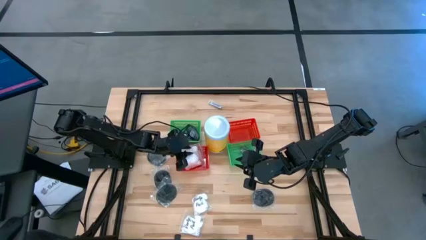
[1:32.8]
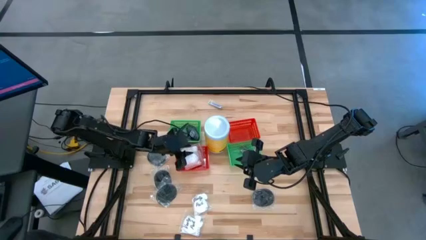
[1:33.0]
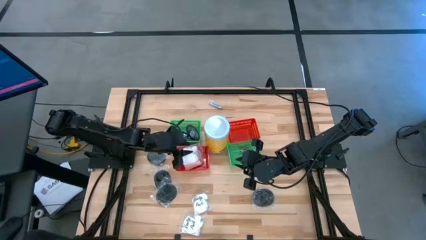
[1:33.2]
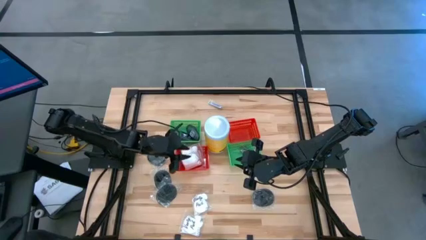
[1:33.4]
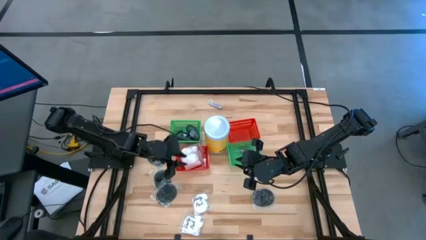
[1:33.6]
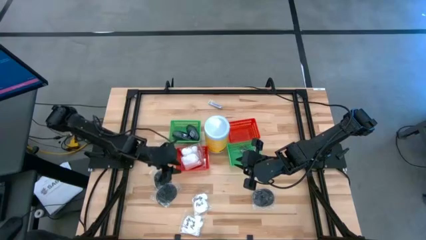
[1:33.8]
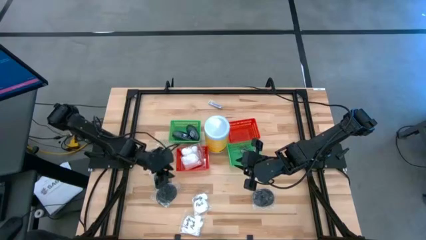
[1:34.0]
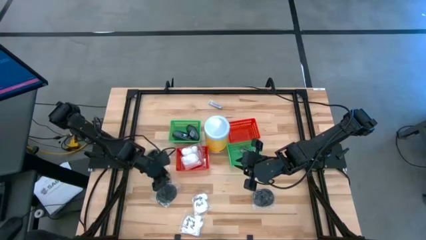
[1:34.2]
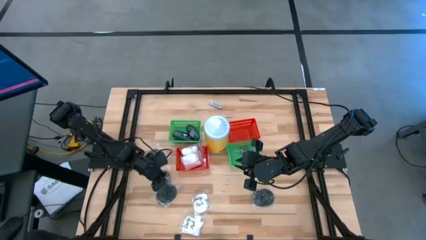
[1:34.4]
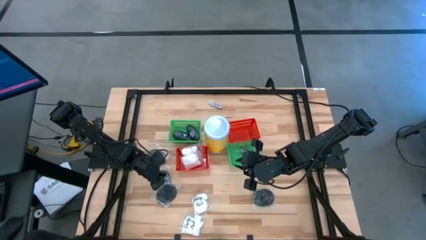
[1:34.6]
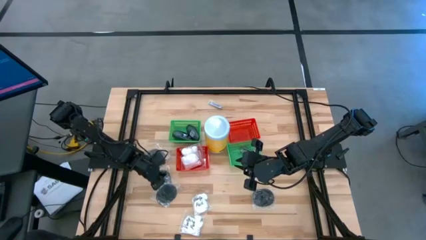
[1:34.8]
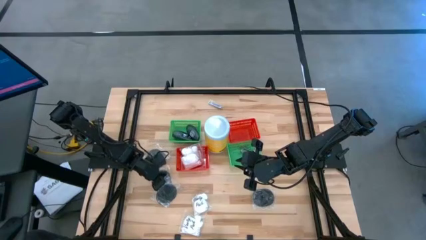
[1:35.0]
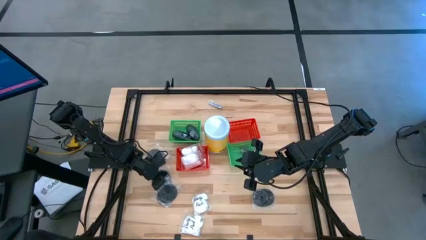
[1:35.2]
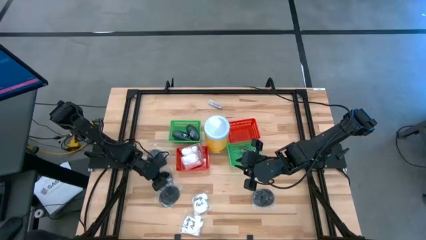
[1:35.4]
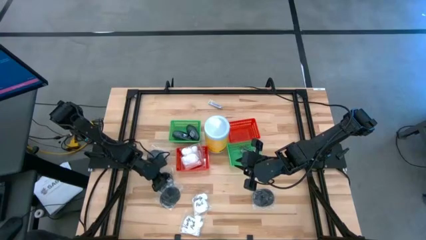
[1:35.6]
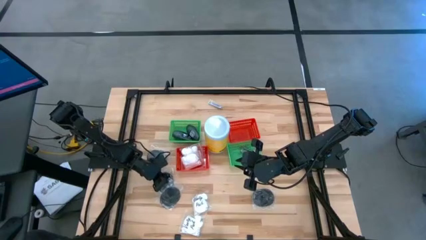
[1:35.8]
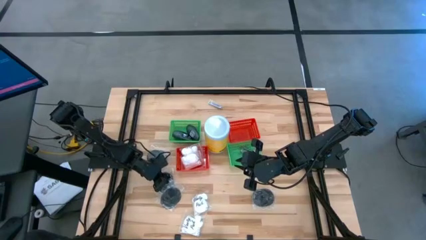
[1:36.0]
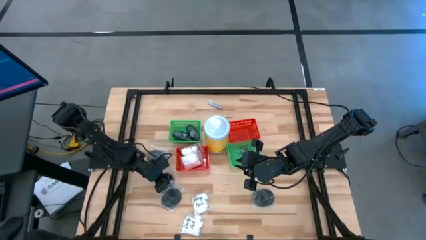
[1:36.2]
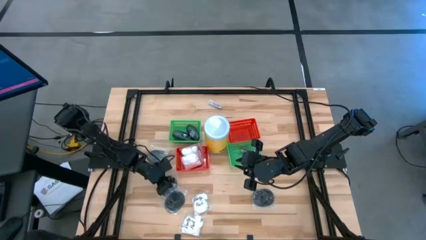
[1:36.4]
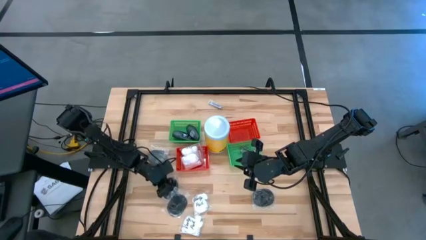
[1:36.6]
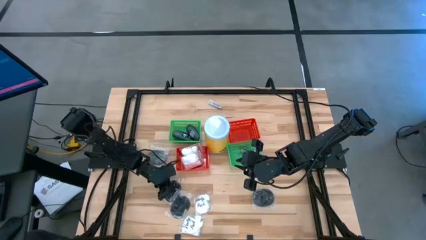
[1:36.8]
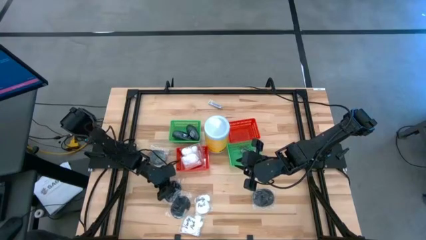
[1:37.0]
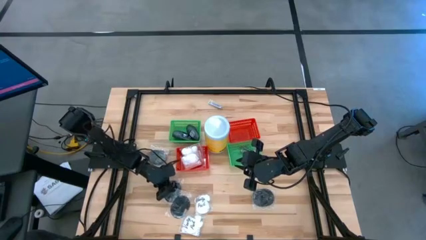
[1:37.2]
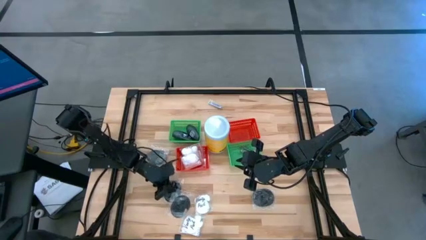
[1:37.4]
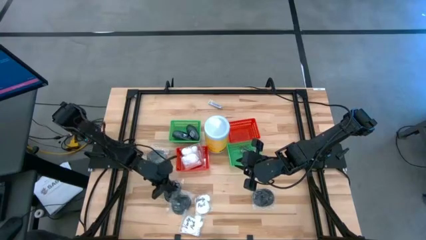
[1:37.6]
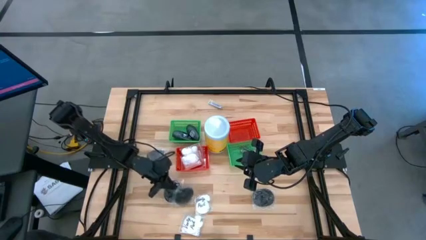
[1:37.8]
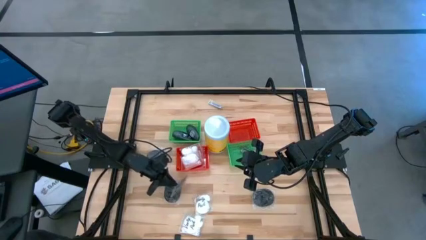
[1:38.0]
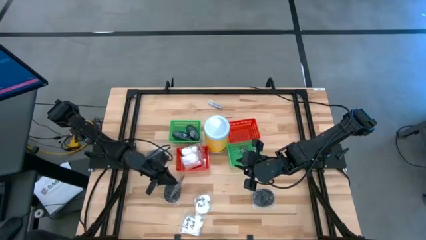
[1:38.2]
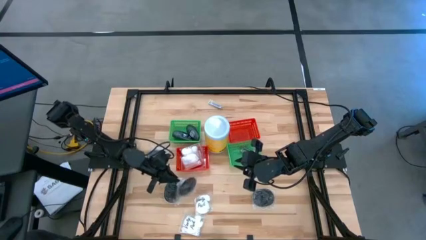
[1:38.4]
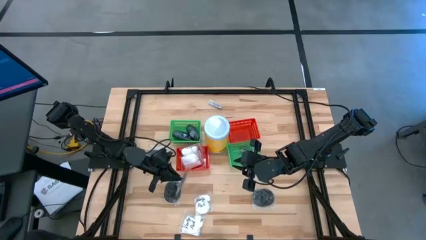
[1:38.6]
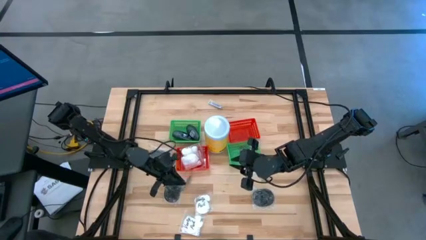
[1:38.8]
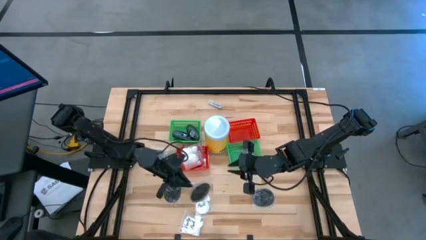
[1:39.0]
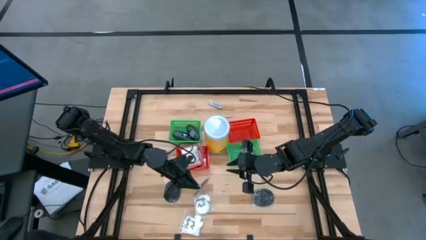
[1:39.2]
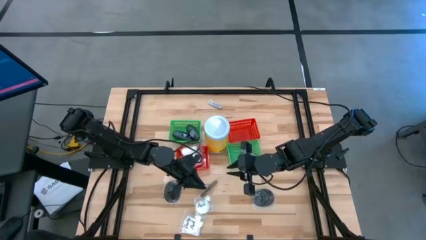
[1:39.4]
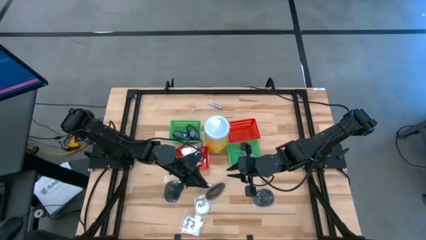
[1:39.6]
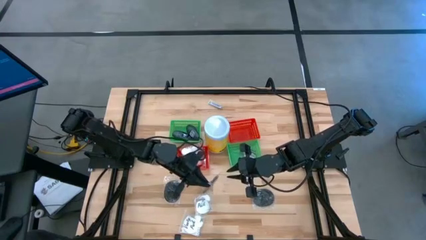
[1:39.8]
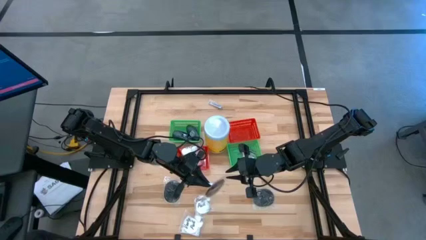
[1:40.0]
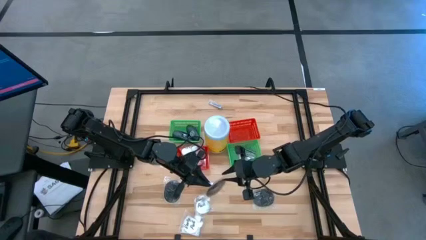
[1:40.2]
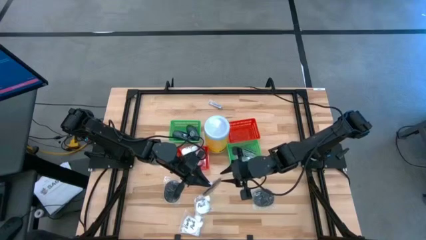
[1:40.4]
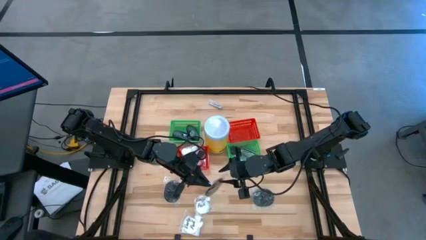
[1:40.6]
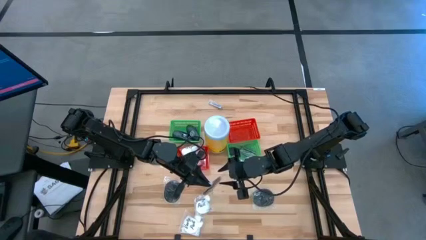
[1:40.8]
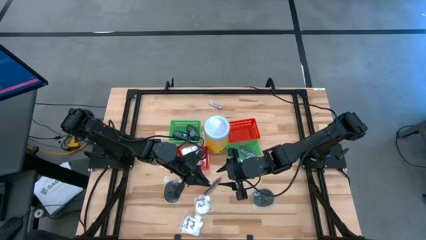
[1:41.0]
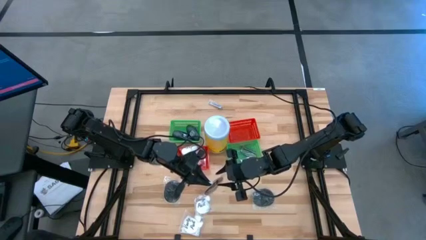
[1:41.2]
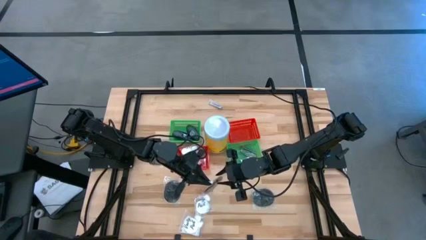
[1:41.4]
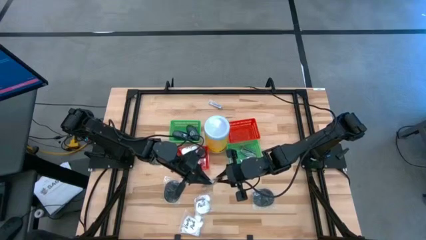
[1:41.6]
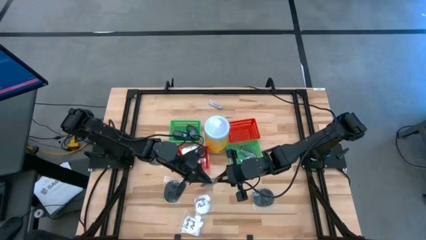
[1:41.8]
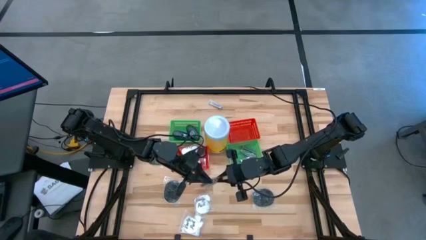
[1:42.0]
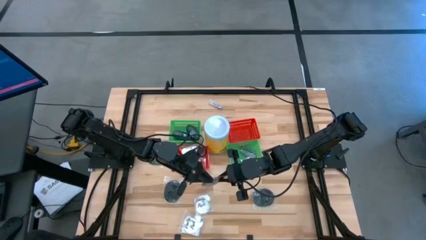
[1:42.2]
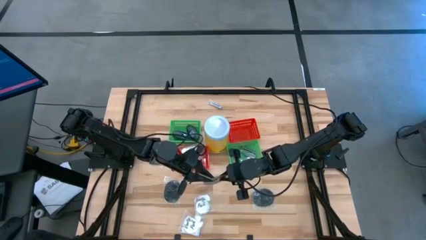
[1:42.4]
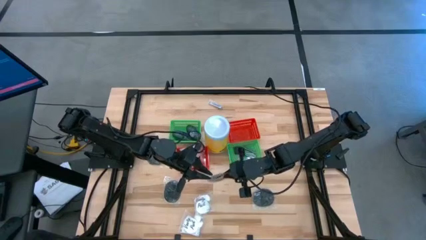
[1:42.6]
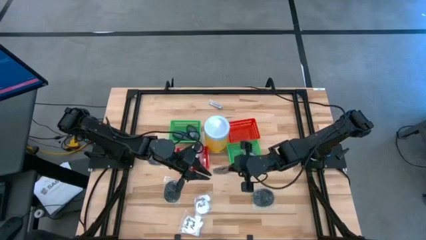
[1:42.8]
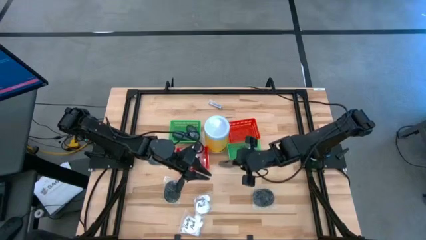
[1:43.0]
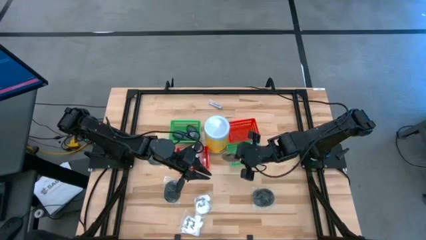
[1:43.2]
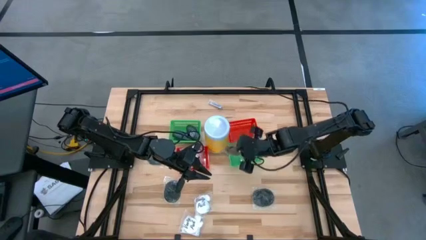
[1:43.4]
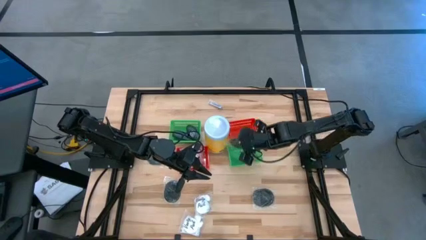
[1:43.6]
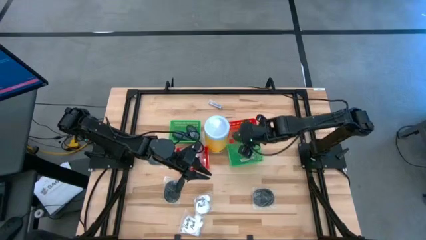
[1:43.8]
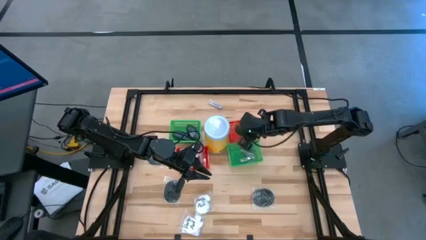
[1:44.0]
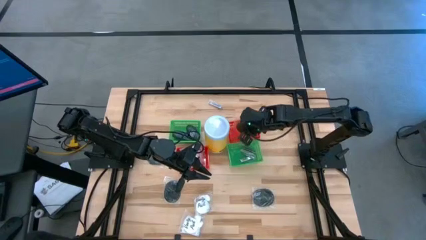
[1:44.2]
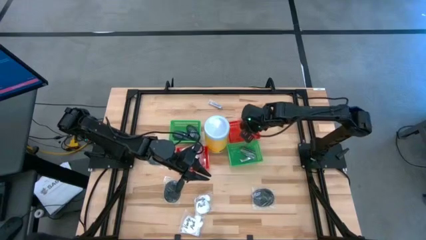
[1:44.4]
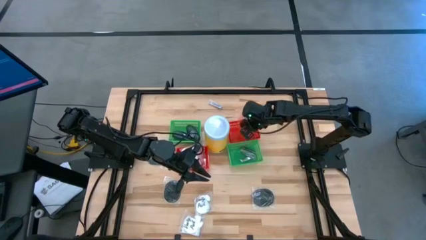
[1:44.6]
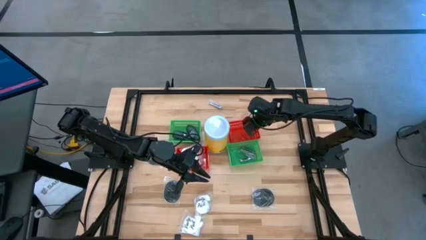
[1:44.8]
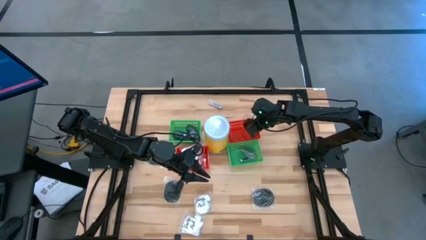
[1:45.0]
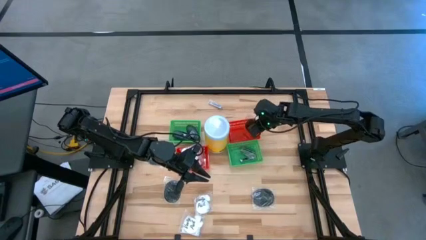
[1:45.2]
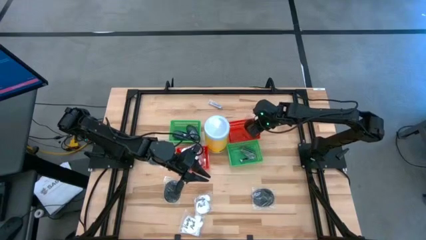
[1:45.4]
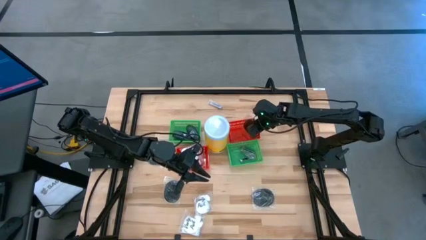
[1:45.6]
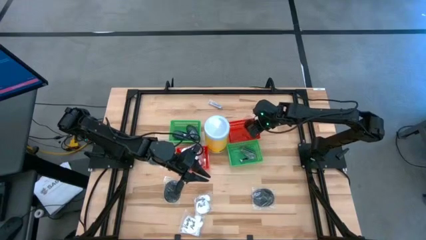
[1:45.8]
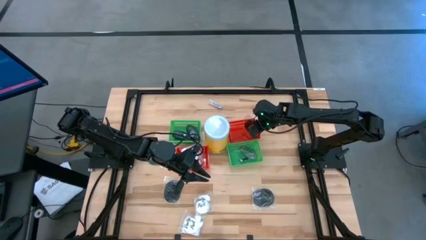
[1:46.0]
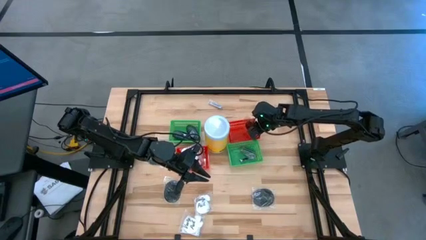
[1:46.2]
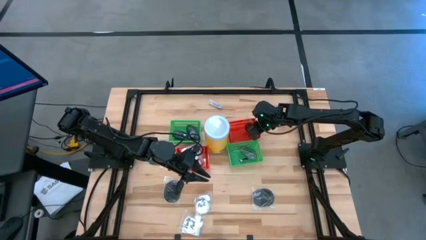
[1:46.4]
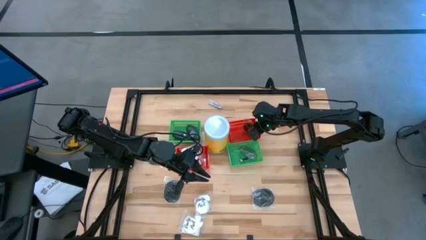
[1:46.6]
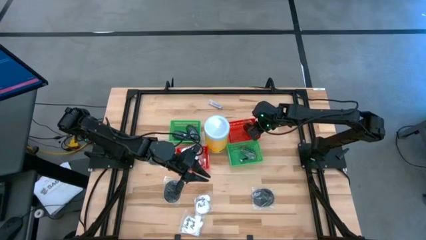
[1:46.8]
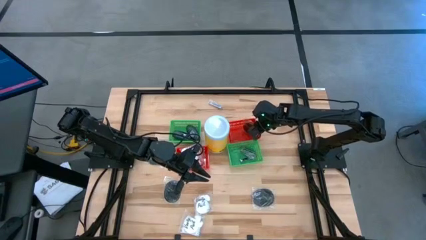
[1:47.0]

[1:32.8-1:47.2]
Task: Pick & Place Travel size toiletries
Put the black hair brush into the right red bin
